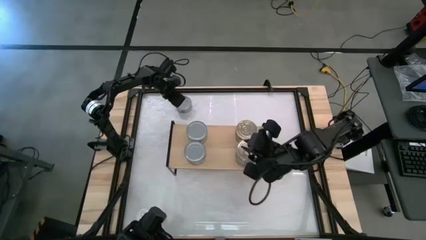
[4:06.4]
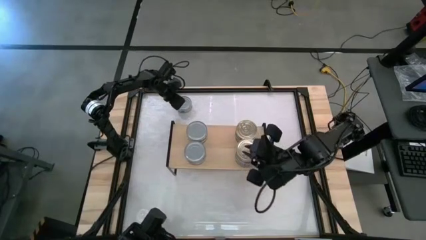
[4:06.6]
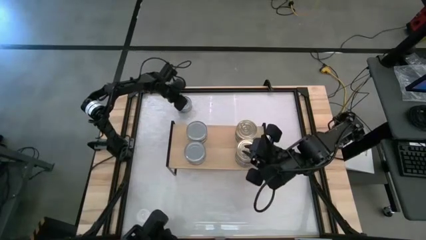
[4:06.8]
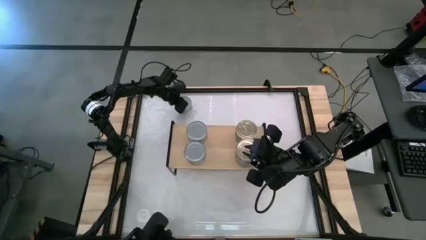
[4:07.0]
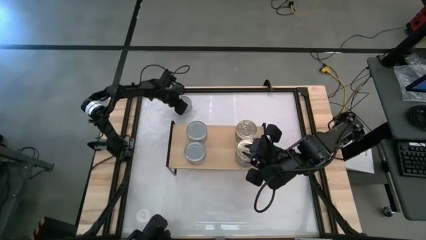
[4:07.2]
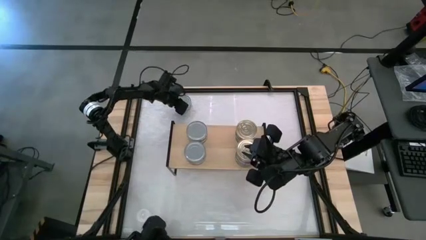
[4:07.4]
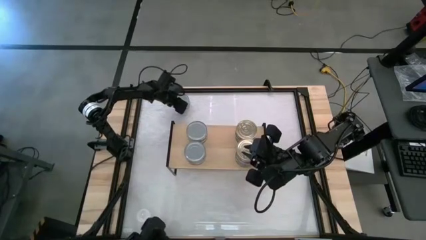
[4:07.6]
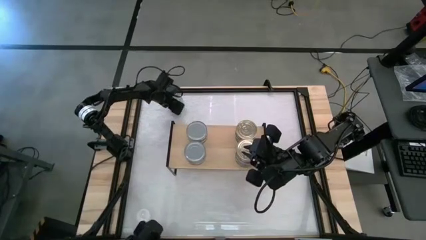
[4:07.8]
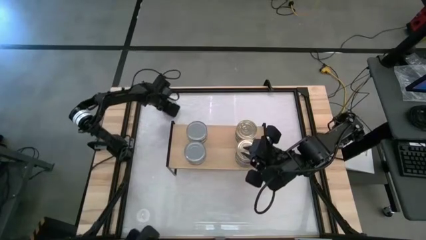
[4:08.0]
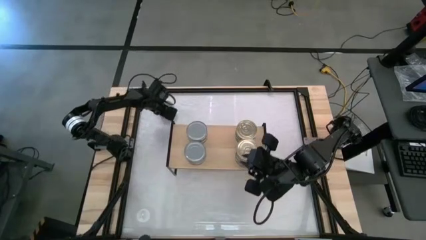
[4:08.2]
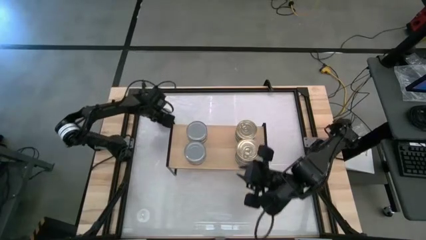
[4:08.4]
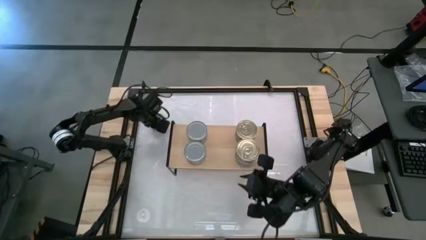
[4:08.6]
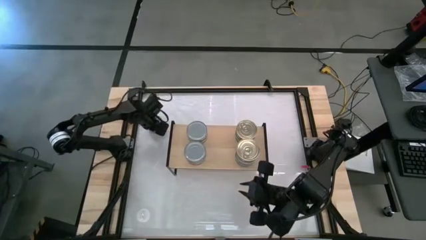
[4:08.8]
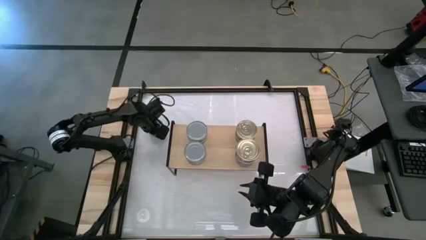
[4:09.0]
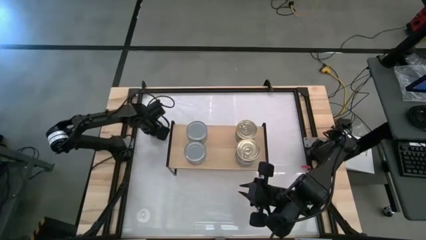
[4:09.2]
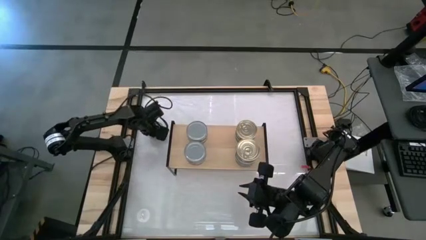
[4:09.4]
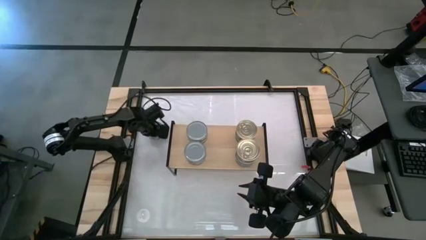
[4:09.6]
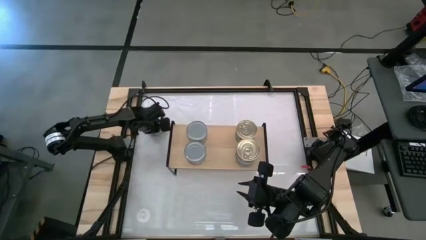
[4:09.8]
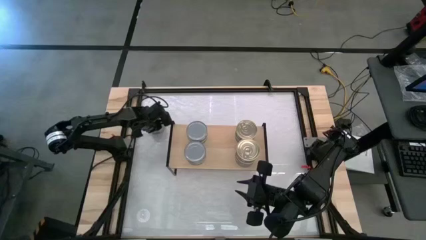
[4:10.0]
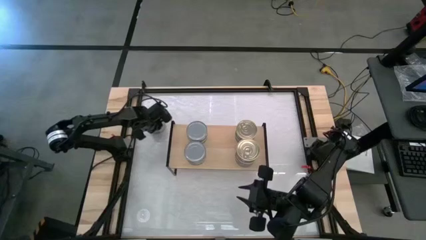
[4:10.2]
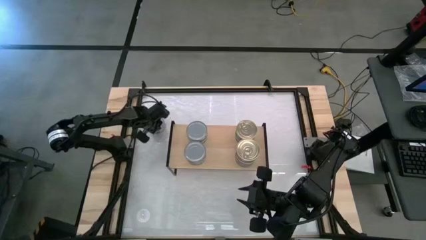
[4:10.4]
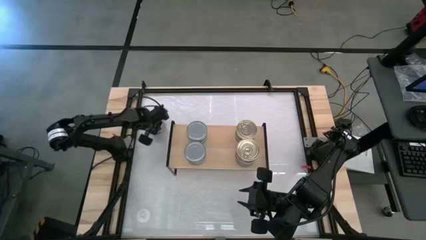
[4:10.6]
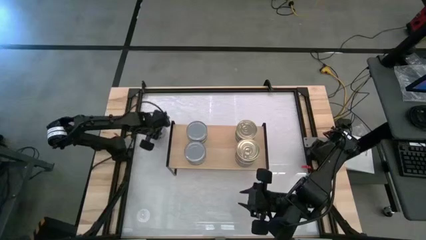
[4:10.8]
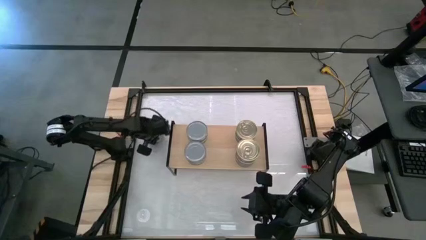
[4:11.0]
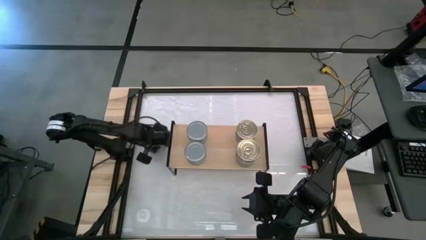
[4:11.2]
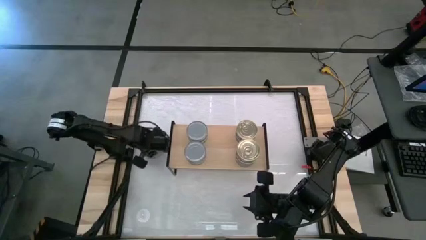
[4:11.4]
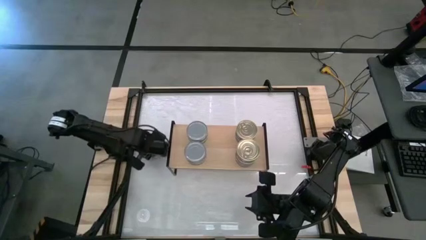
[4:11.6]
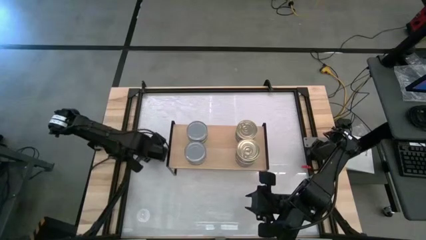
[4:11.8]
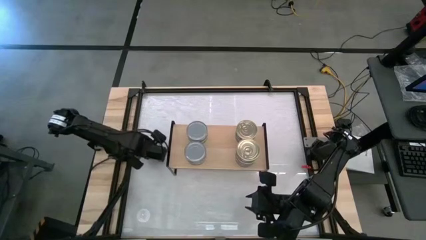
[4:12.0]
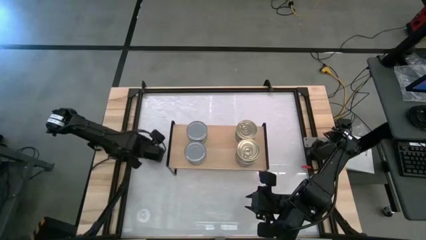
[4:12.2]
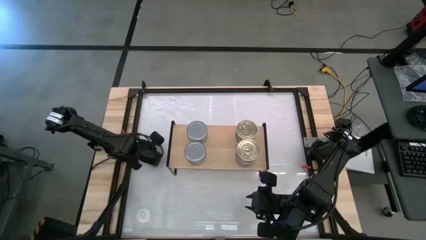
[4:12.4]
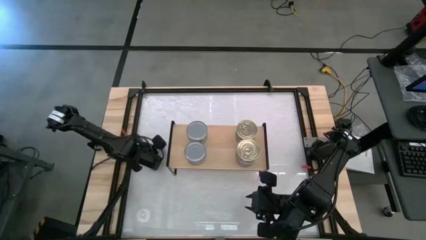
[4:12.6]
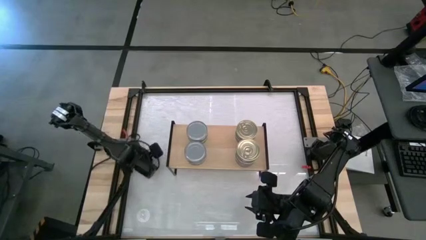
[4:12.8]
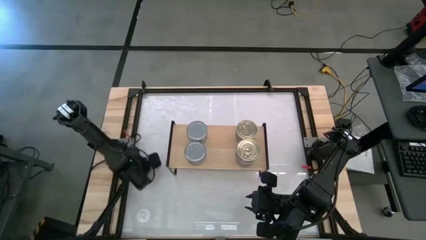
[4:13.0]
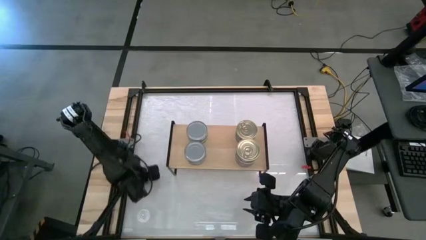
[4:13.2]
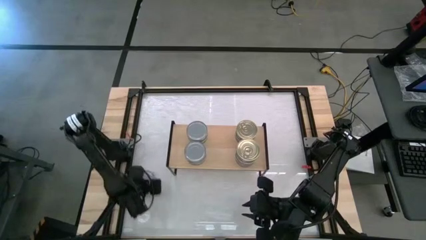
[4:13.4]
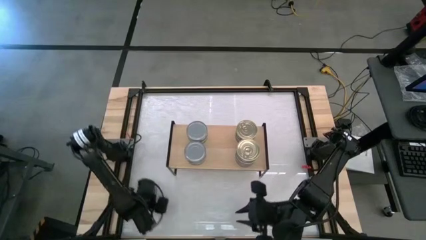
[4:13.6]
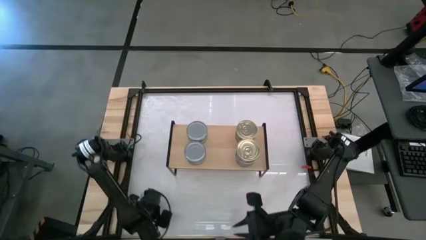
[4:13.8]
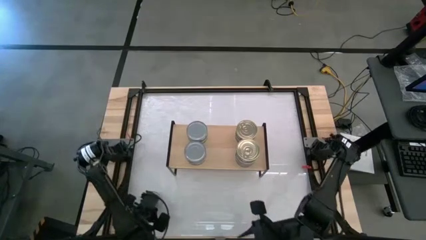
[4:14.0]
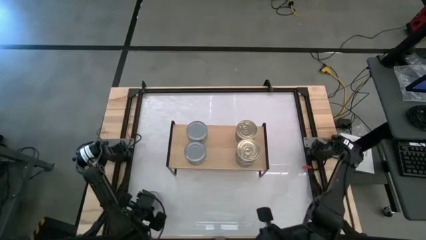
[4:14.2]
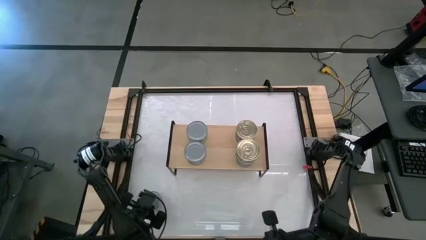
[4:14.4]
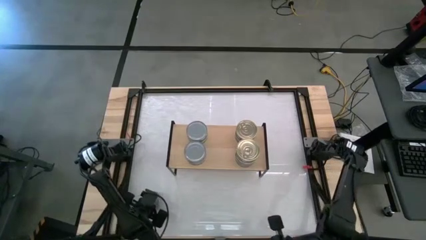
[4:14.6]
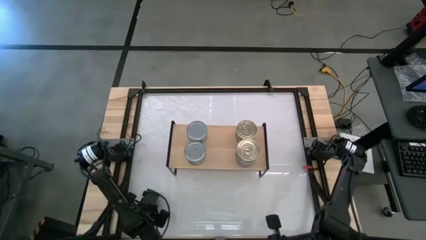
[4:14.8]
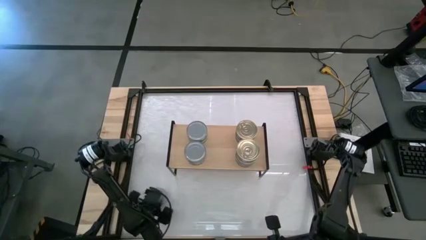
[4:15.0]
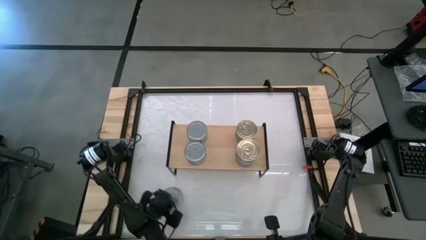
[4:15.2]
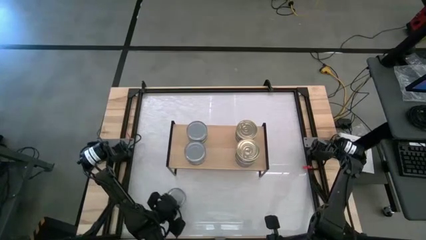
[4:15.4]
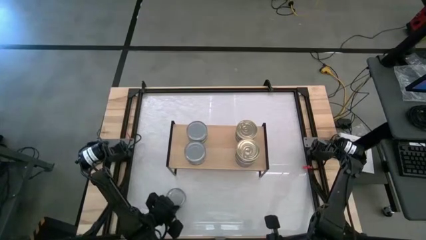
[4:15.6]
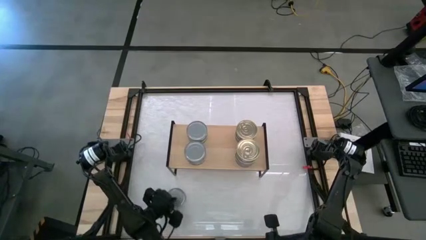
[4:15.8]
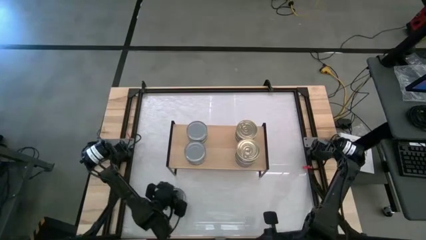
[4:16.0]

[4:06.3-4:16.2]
Task: Stack canned seafood by type on shelf
Stack the green tuna can on top of the other green tuna can on the shelf
